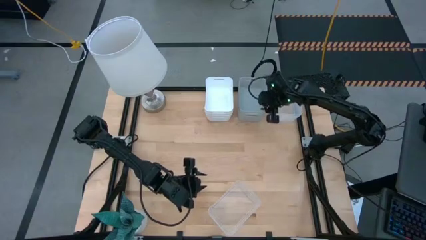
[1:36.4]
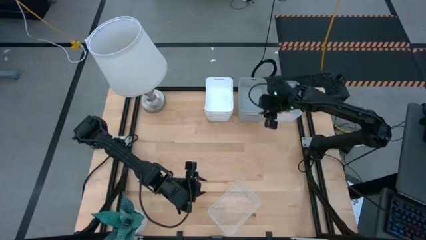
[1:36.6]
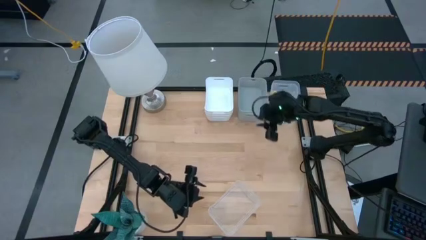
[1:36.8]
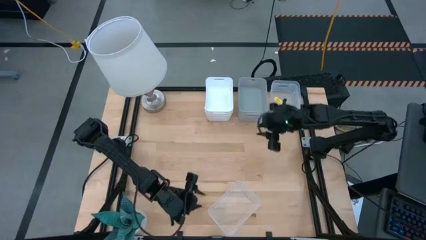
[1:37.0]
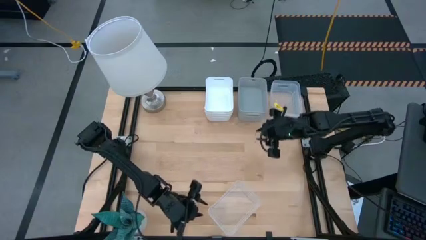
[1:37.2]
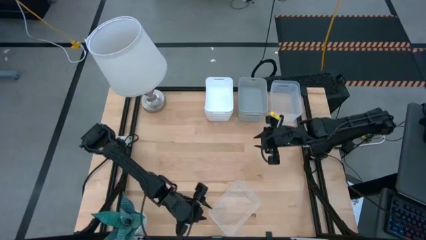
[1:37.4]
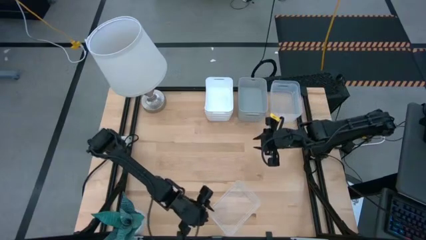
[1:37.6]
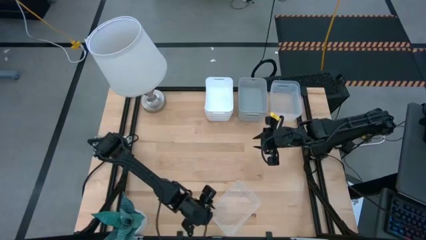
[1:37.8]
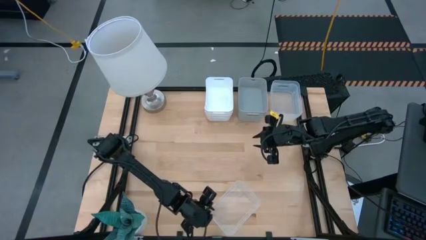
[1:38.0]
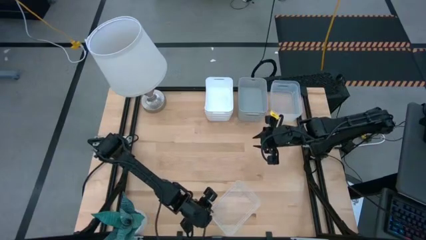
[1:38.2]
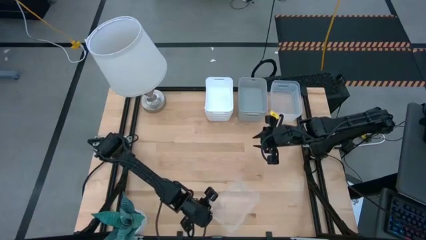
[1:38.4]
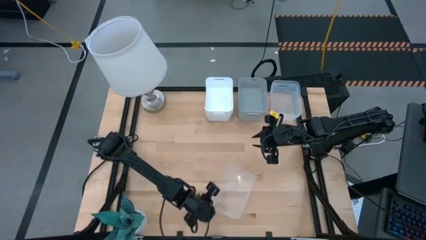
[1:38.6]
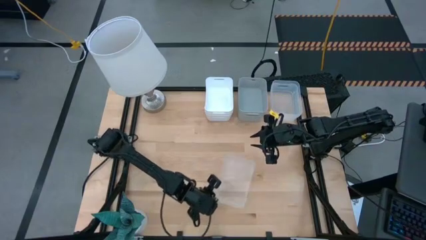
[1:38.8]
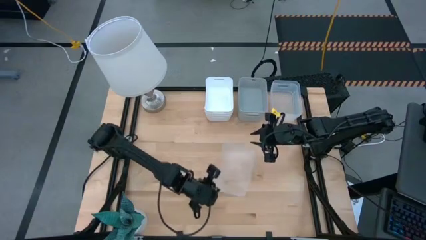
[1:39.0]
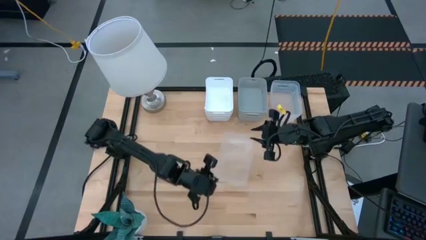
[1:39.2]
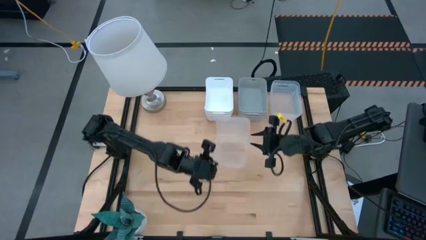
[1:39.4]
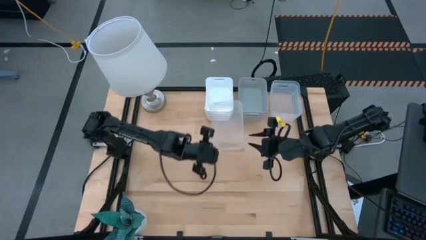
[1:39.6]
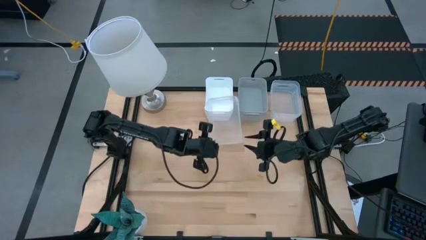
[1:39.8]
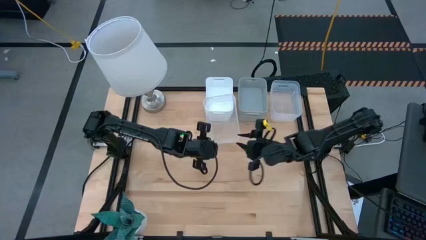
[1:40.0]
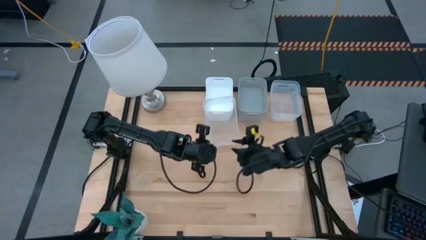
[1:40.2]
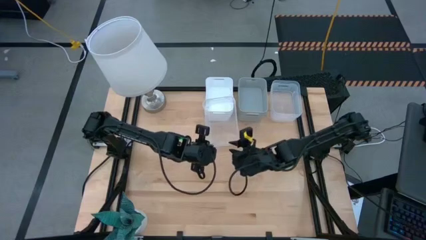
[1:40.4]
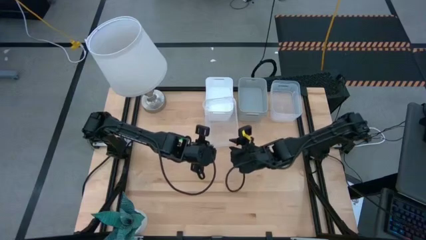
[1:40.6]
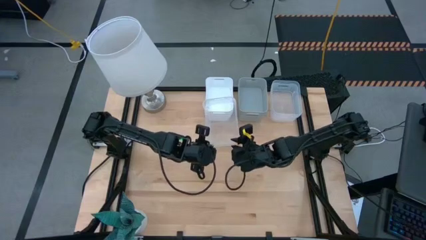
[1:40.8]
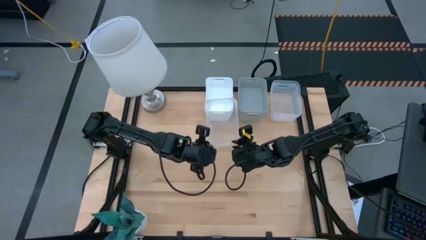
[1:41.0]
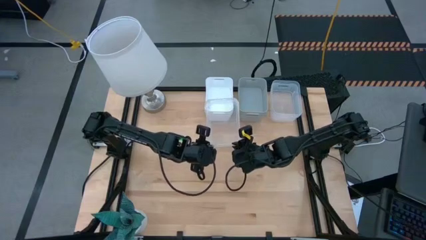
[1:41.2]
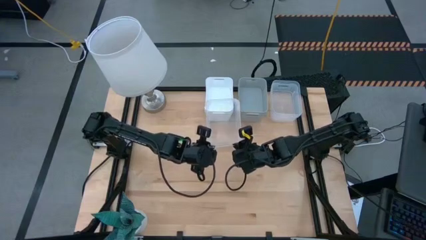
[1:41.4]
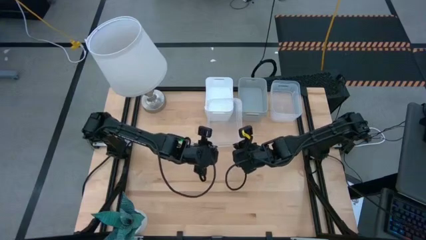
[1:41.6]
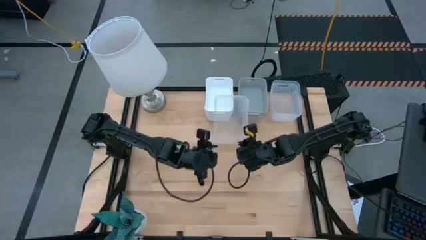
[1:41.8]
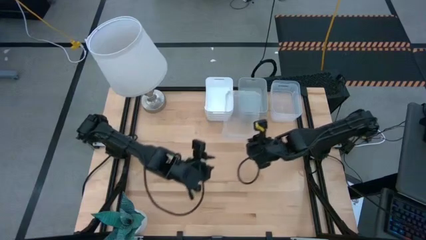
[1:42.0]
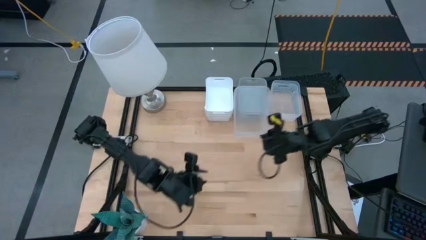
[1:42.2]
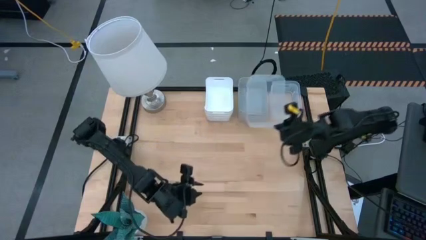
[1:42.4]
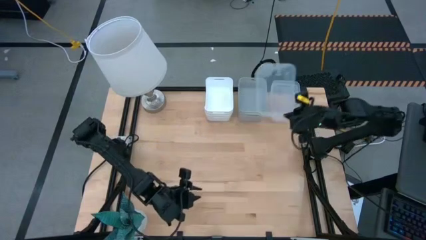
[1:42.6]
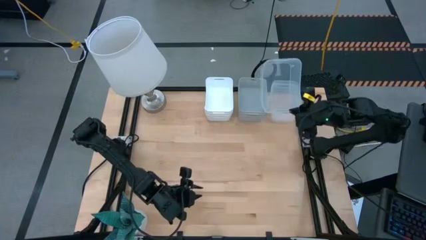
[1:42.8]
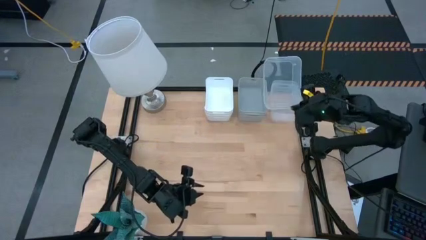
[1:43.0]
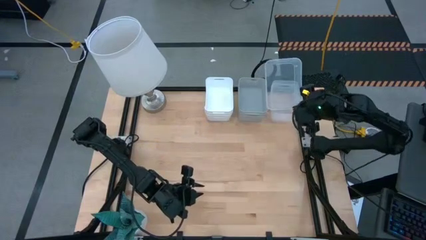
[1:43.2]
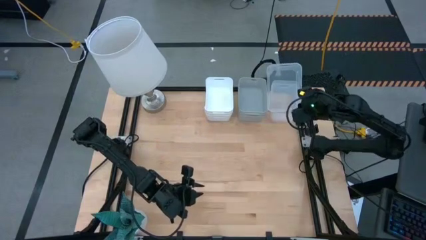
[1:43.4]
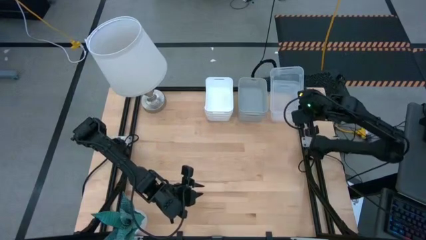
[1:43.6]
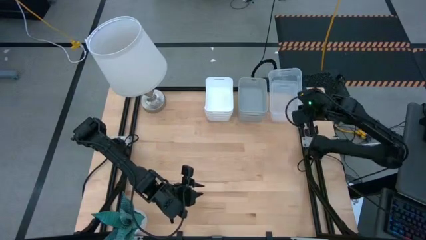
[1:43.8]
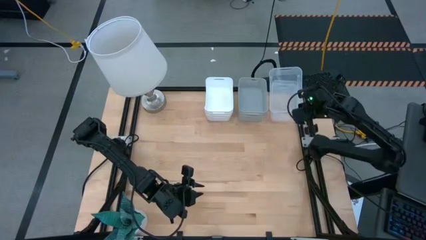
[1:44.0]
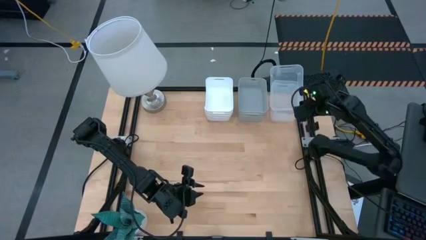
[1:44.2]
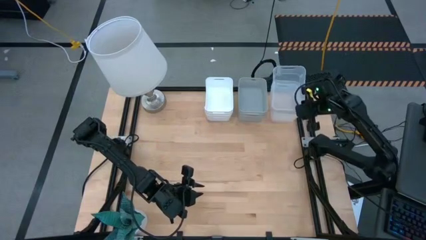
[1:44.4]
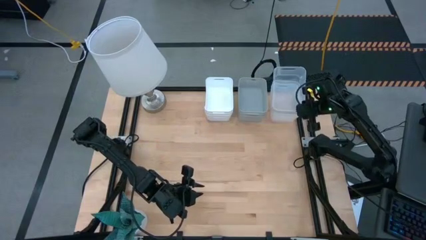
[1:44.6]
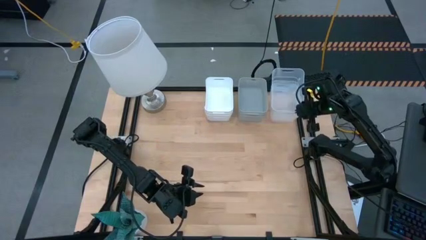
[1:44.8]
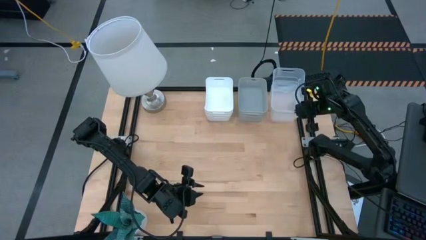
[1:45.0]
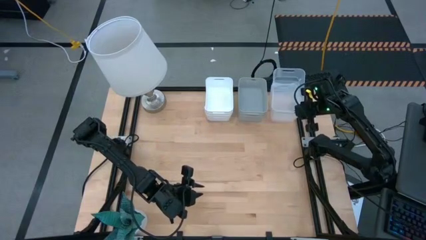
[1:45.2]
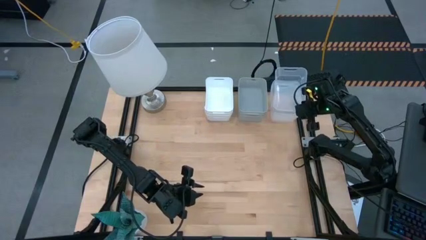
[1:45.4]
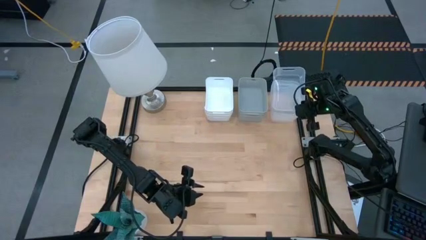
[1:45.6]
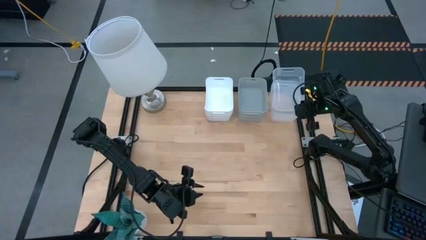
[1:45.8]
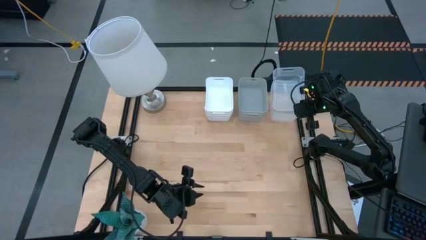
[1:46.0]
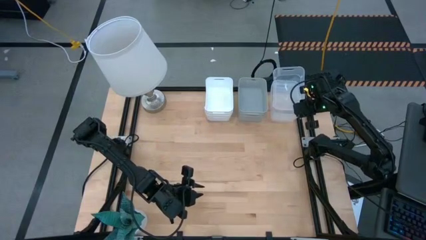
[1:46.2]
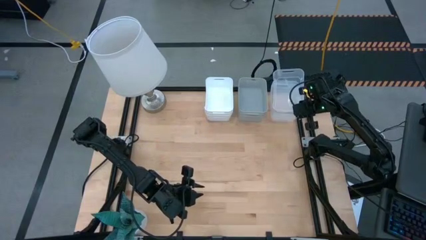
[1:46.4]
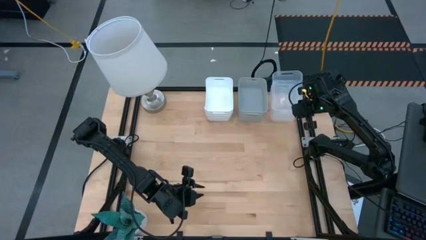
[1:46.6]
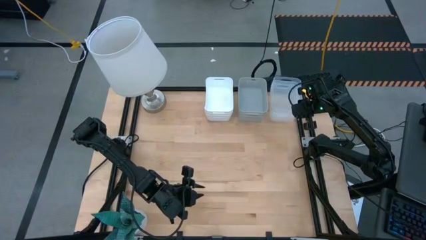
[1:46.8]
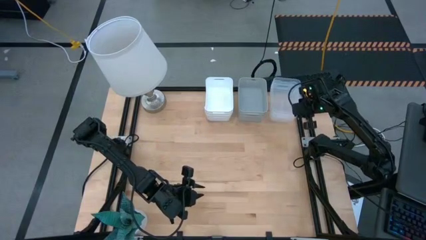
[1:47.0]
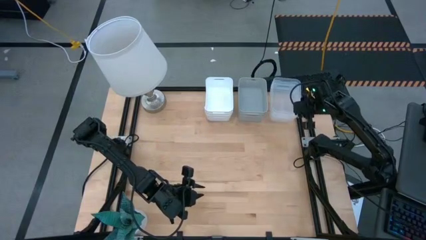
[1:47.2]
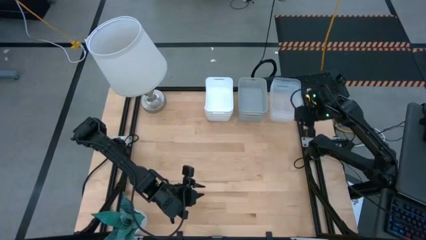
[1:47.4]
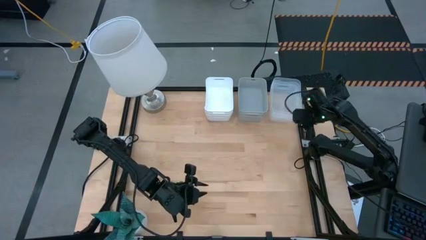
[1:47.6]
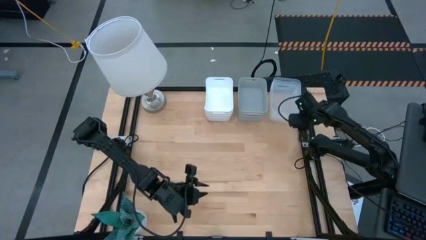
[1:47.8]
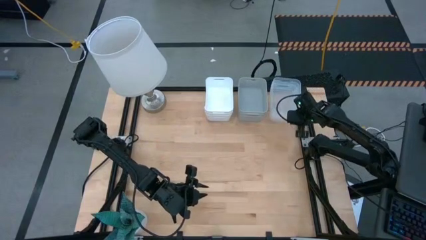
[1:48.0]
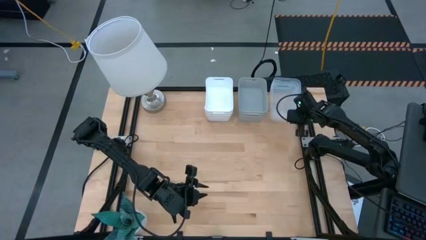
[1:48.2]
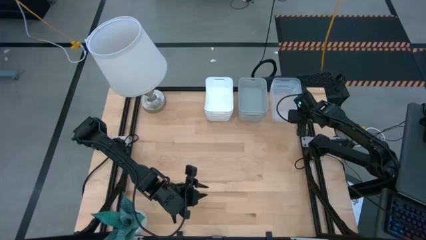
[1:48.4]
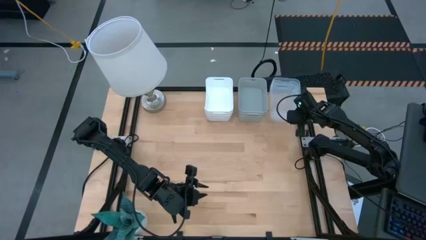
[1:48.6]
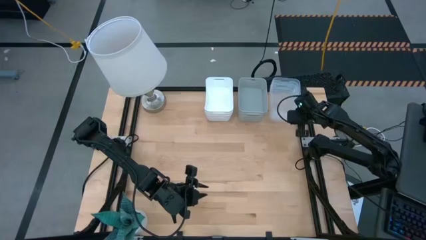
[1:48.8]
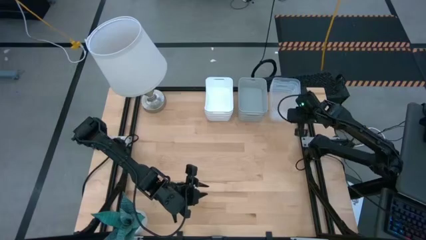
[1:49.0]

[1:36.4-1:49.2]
Stack the bottom transparent bin on top of the top transparent bin
